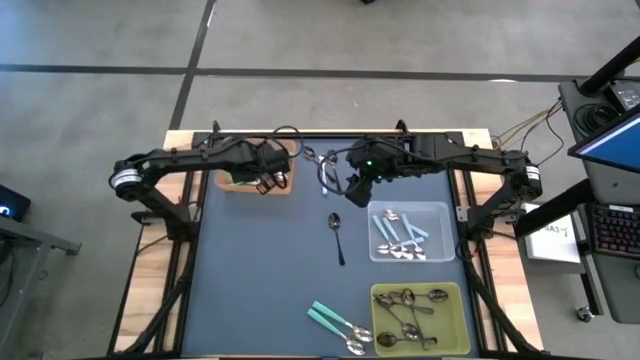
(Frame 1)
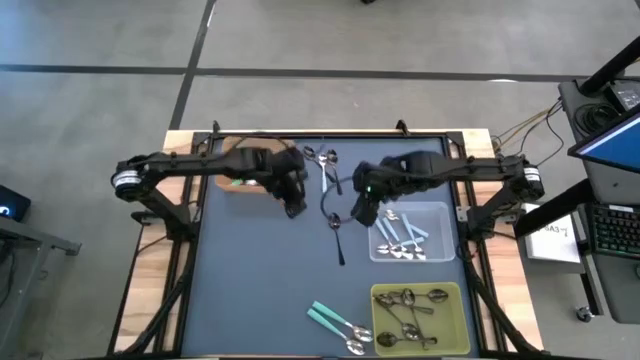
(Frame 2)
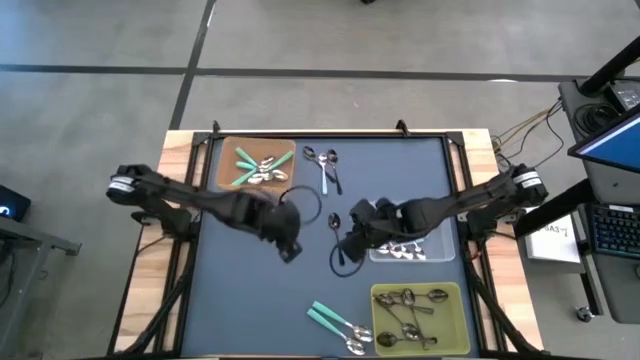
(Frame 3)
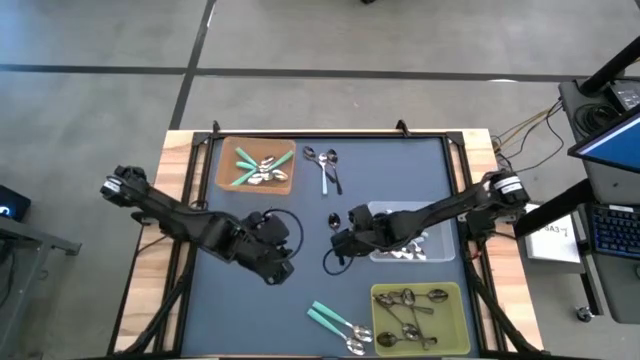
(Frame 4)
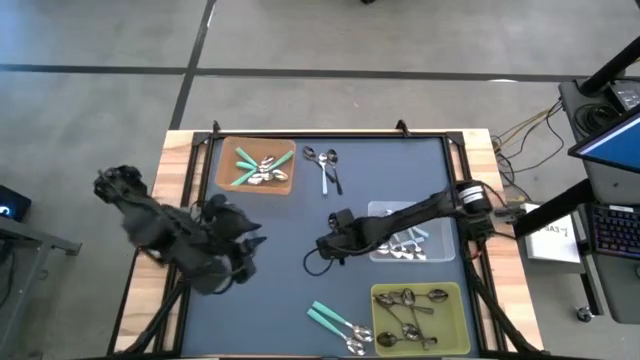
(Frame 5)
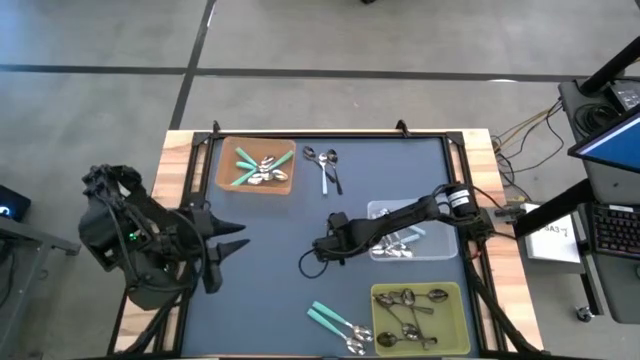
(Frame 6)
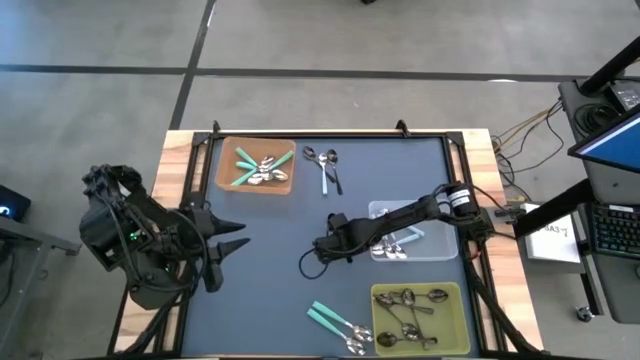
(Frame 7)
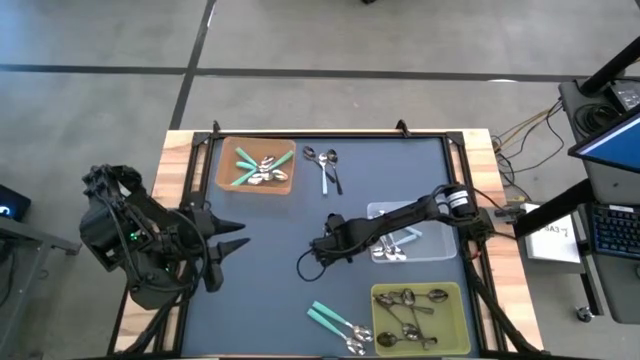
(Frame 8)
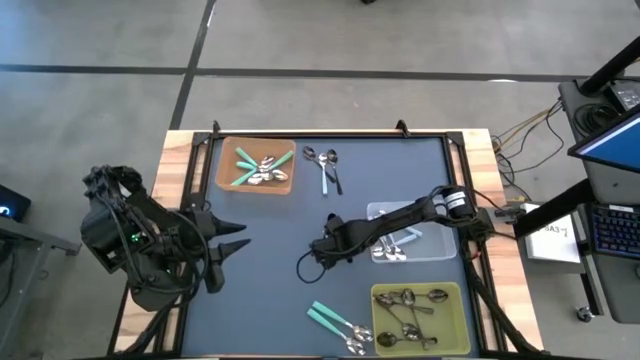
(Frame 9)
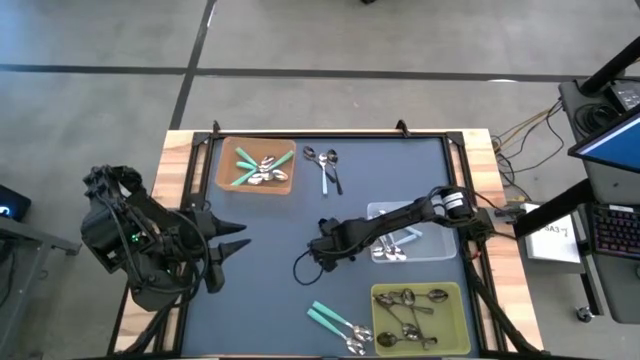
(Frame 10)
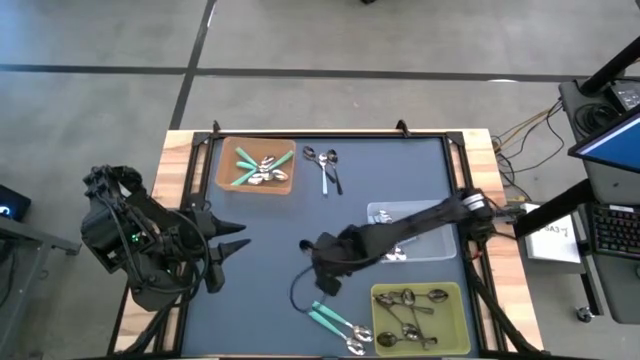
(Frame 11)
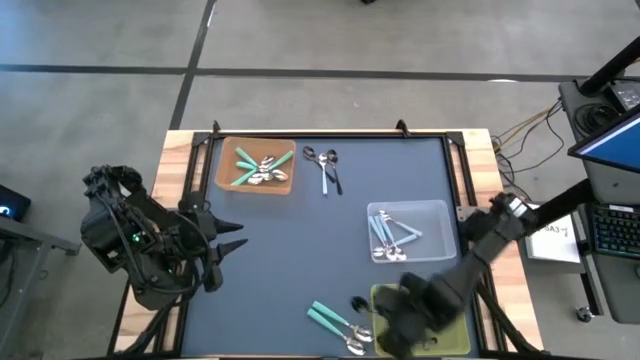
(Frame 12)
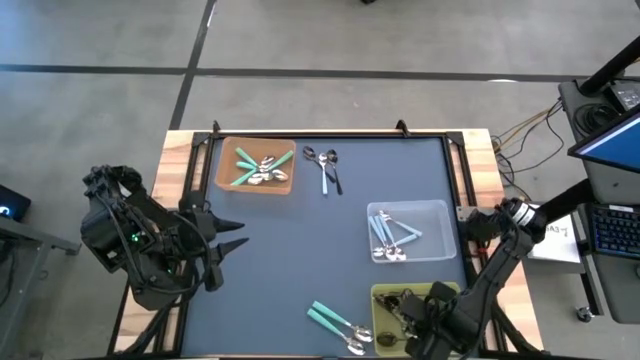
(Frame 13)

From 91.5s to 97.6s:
Task: Sort silverware by color (type)
Put the black spoon into the yellow bin

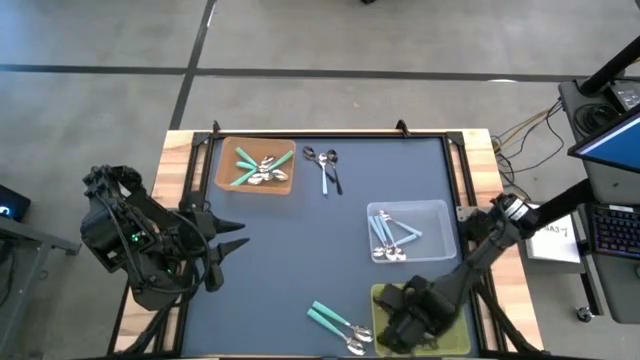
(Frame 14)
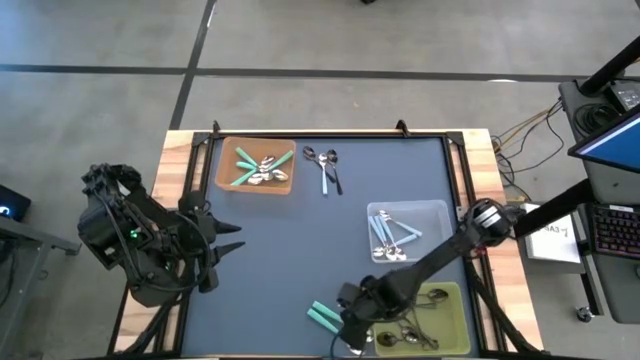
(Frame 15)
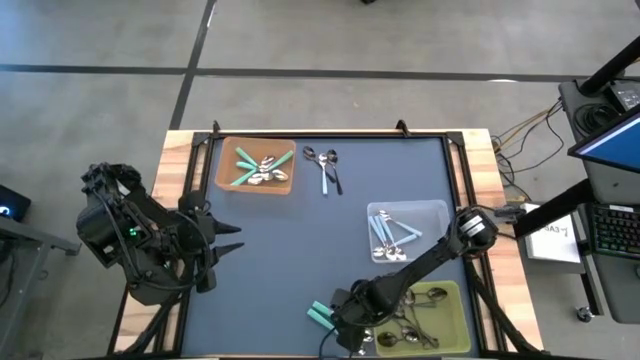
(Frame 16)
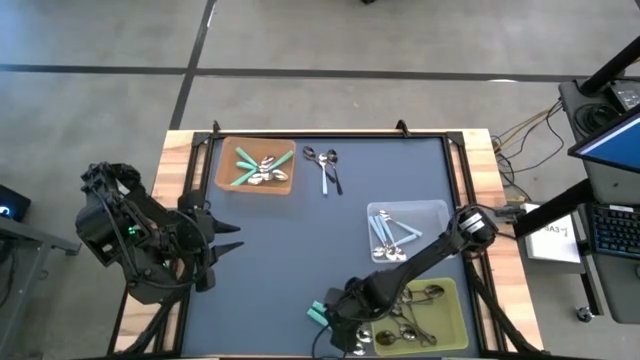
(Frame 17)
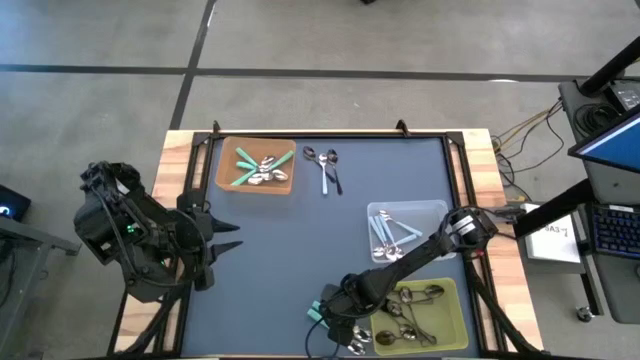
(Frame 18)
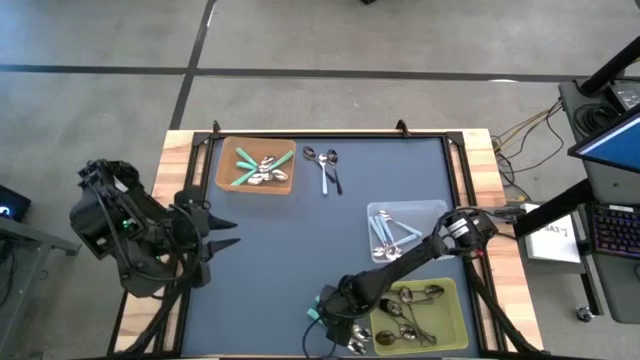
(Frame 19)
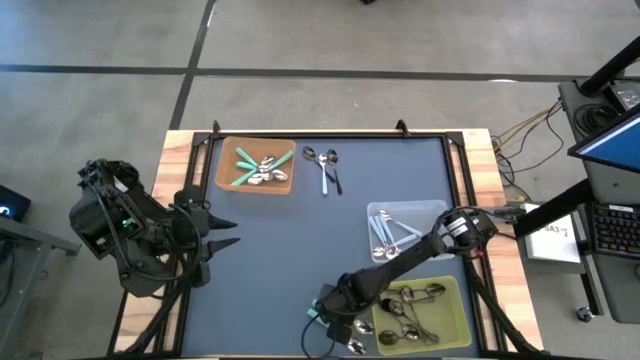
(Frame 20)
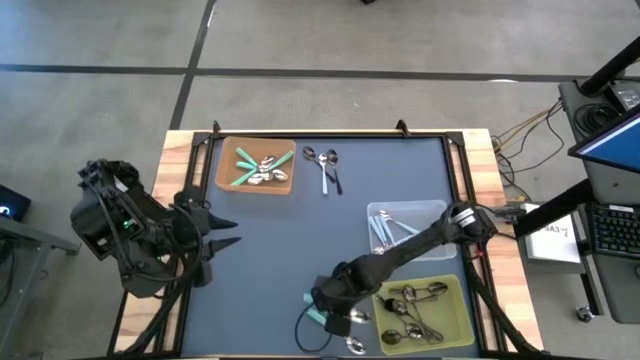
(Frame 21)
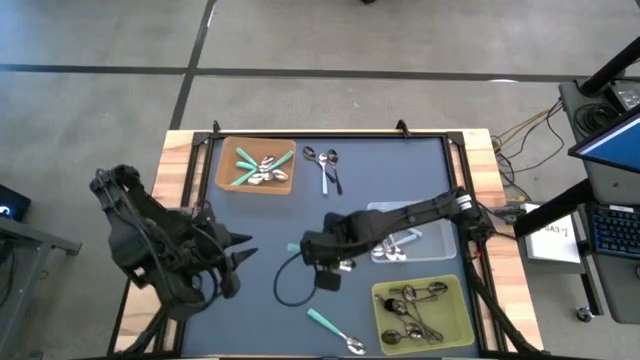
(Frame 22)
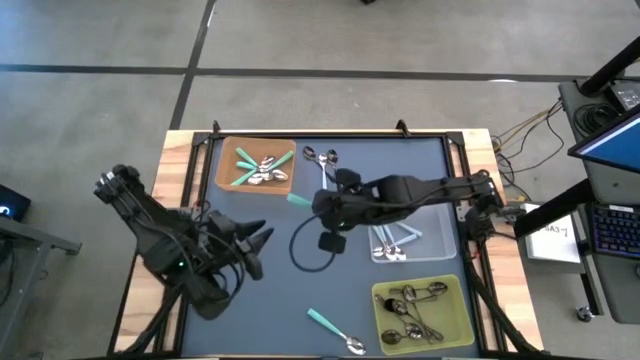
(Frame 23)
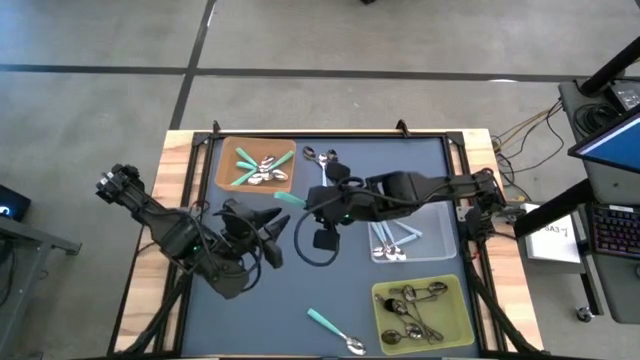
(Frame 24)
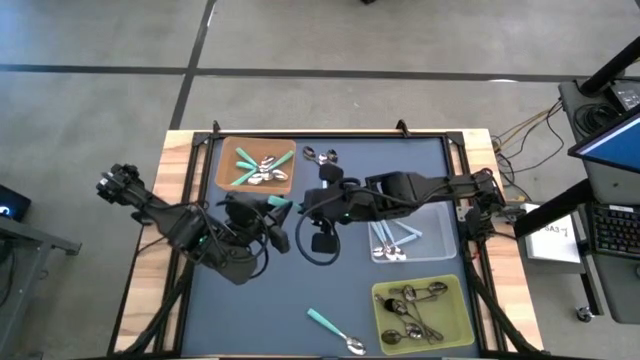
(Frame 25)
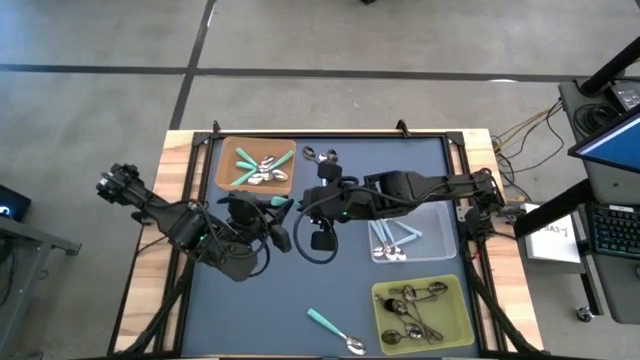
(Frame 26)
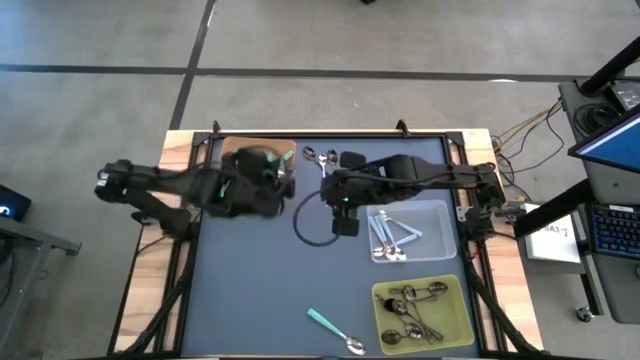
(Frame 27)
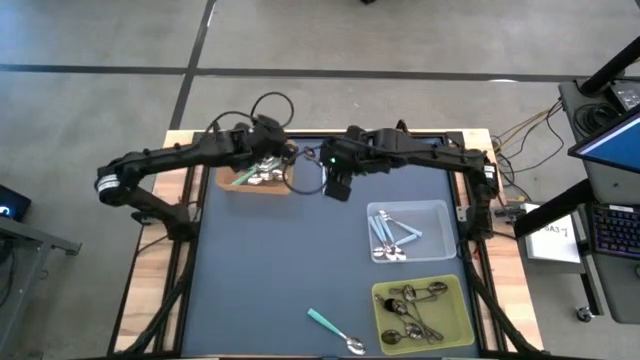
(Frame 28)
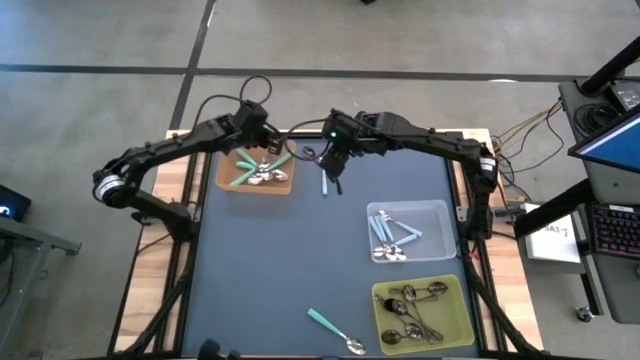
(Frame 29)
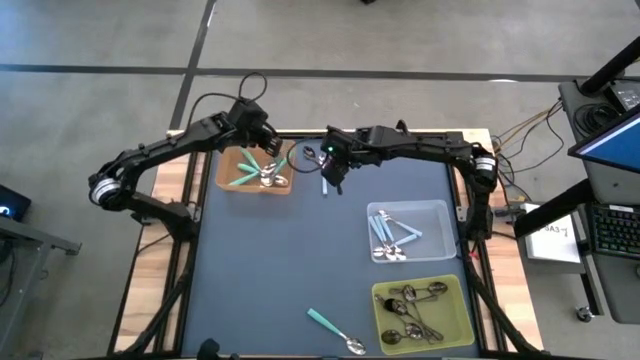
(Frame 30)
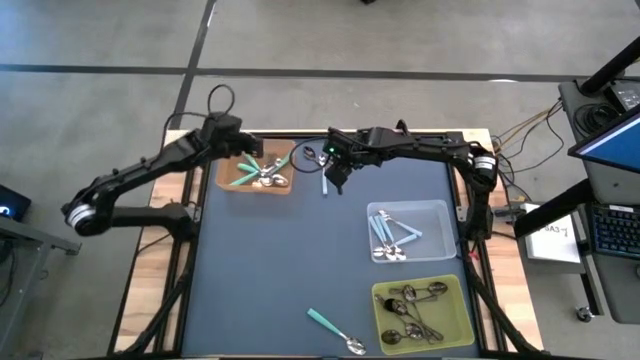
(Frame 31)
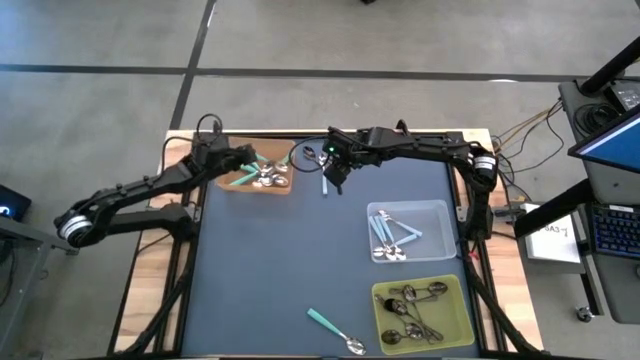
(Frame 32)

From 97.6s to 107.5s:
Put the green spoon into the orange bin

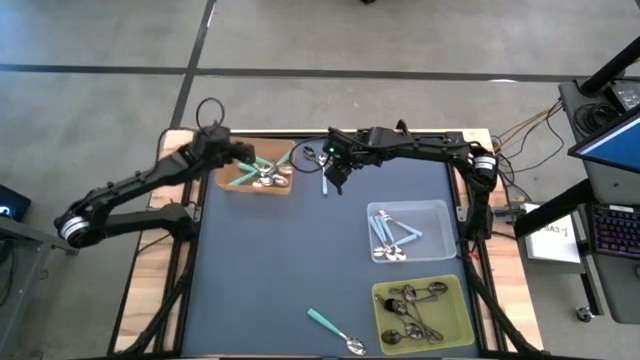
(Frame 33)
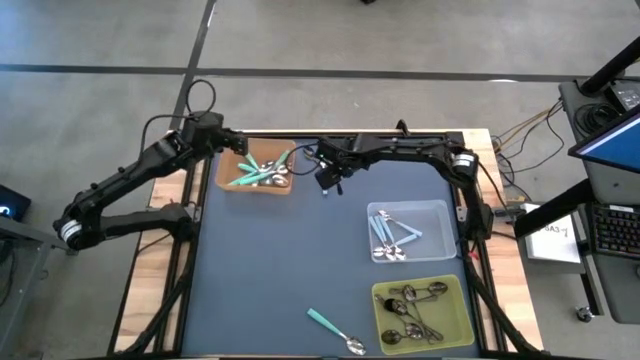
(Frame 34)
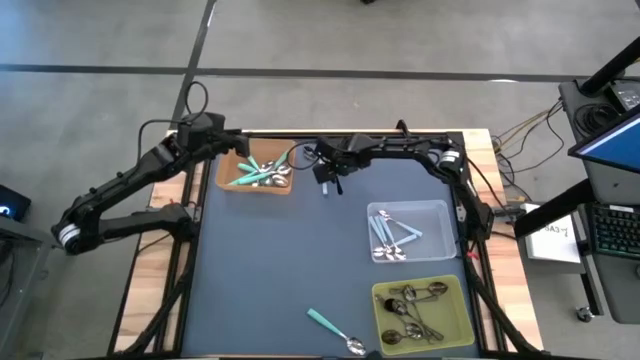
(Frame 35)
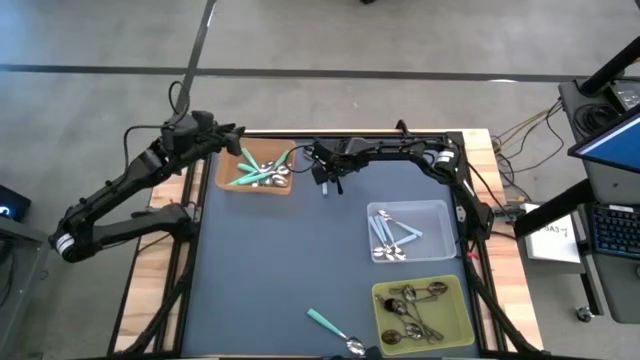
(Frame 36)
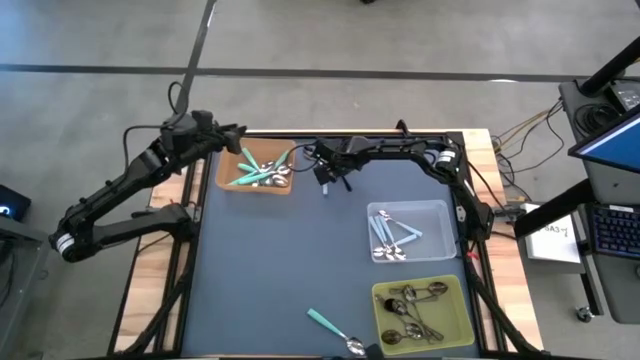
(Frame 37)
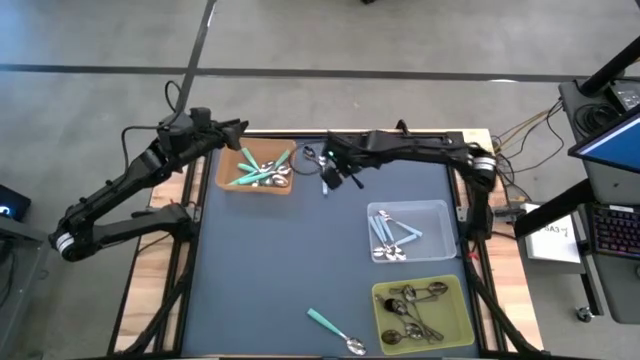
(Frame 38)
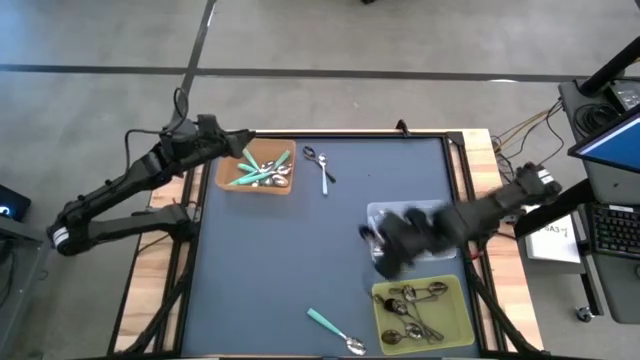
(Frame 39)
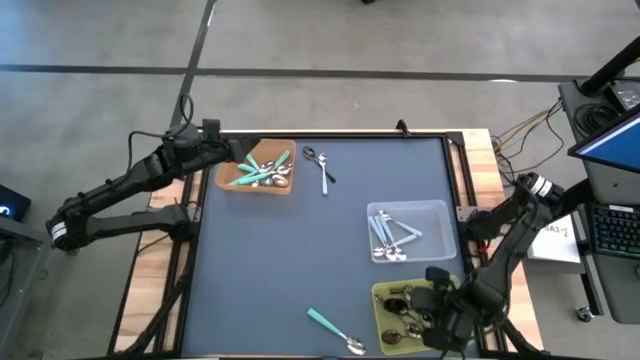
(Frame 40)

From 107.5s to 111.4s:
Put the black spoon into the yellow bin

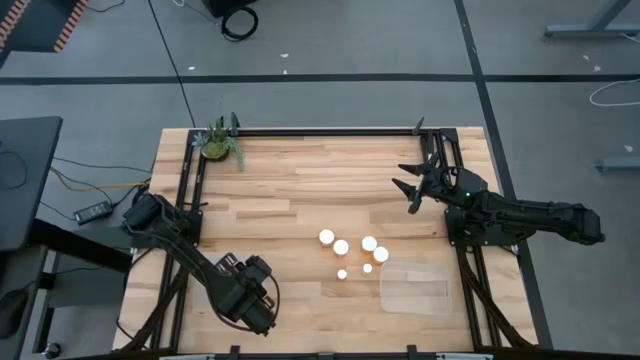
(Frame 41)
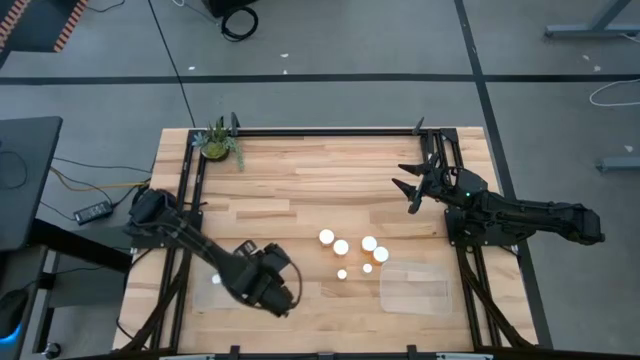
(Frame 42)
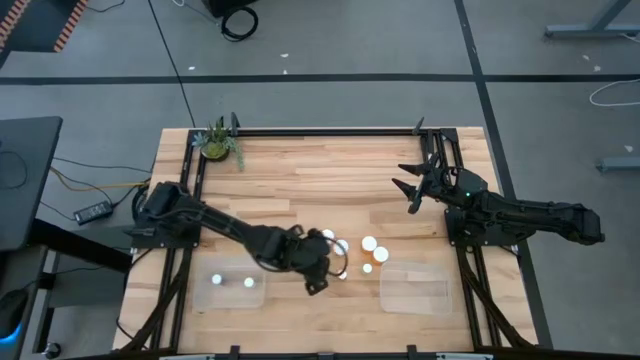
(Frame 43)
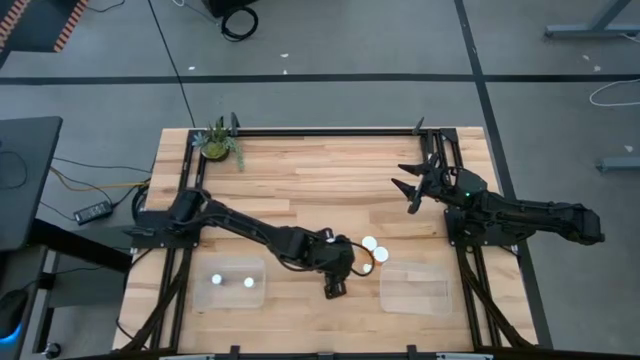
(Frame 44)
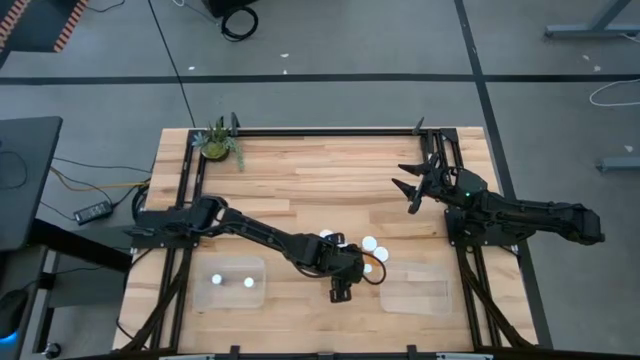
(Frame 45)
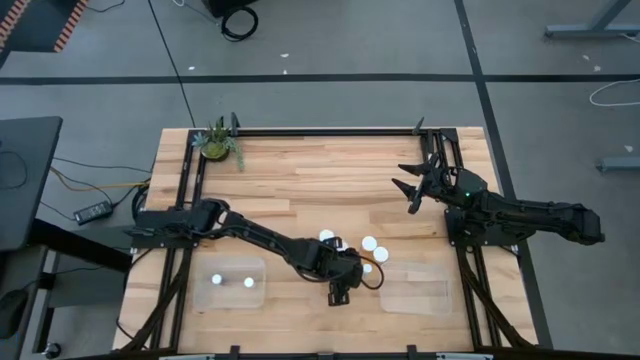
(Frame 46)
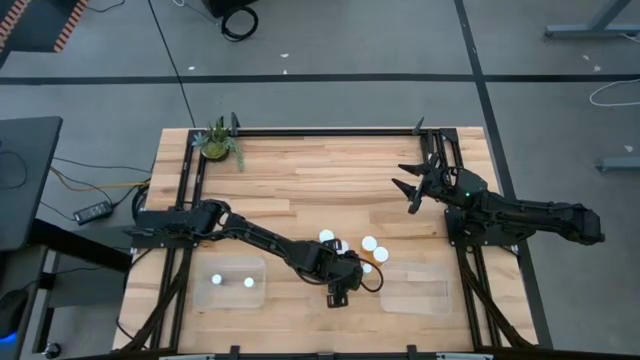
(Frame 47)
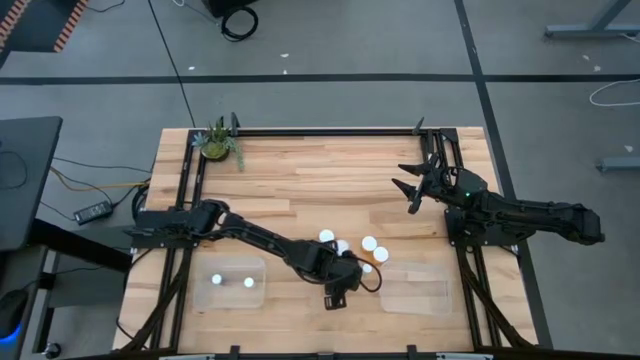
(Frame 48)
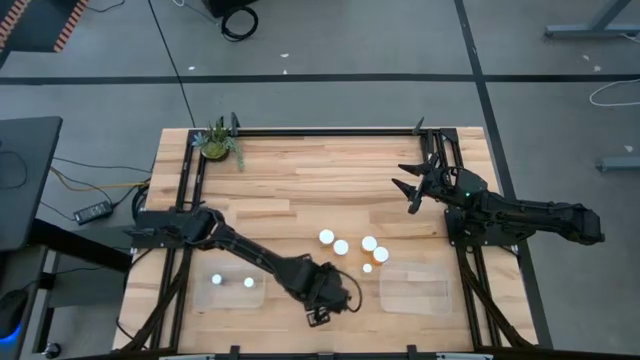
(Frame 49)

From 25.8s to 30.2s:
Task: Pick and place medicine bottles into bin by pill shape (circle, oval)
Put the small orange pill bottle into the left transparent bin
